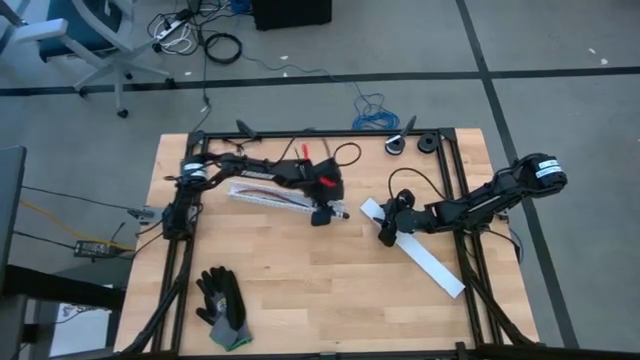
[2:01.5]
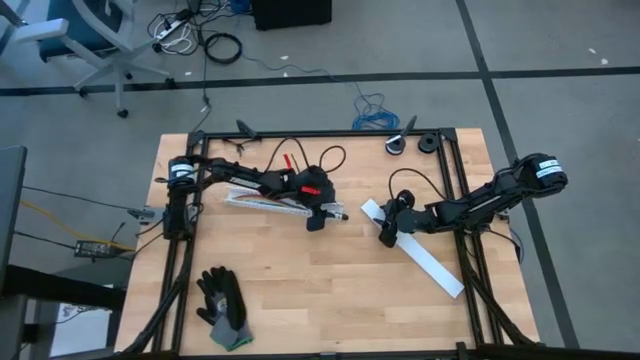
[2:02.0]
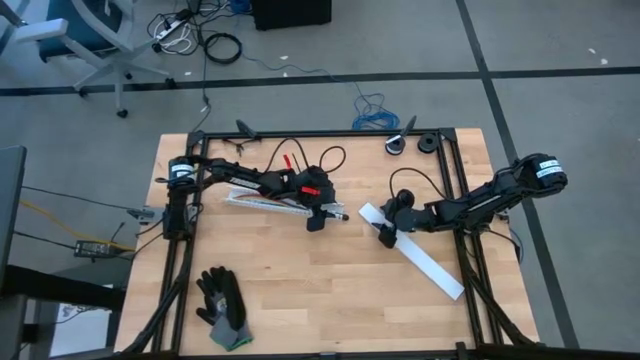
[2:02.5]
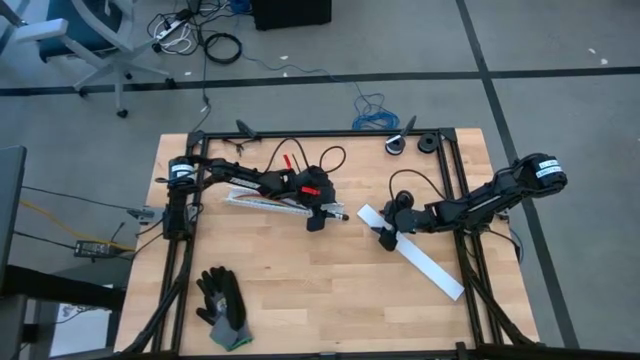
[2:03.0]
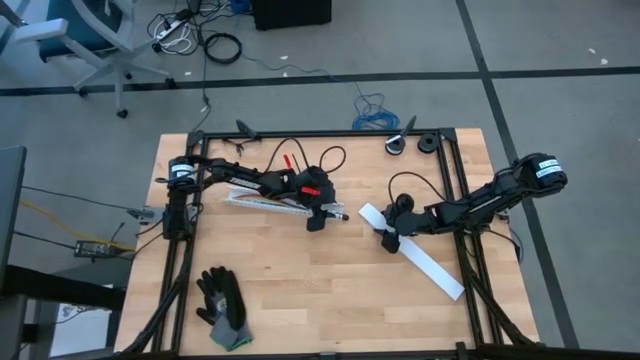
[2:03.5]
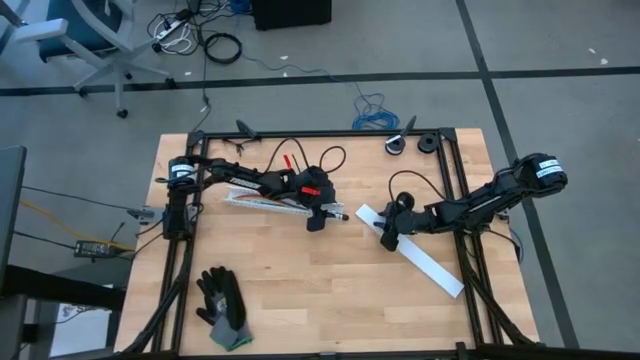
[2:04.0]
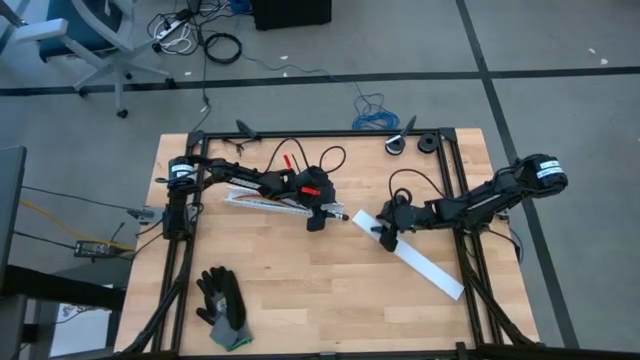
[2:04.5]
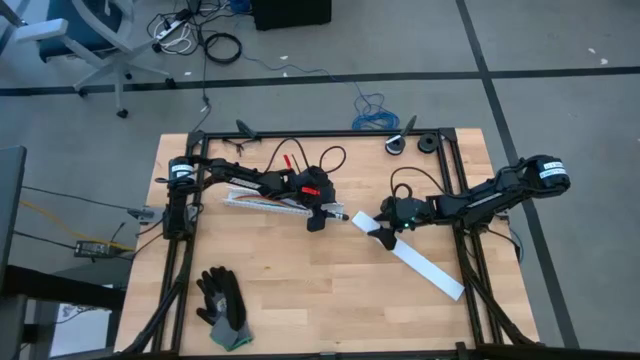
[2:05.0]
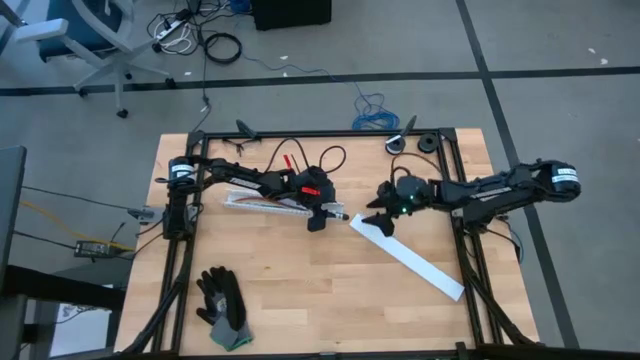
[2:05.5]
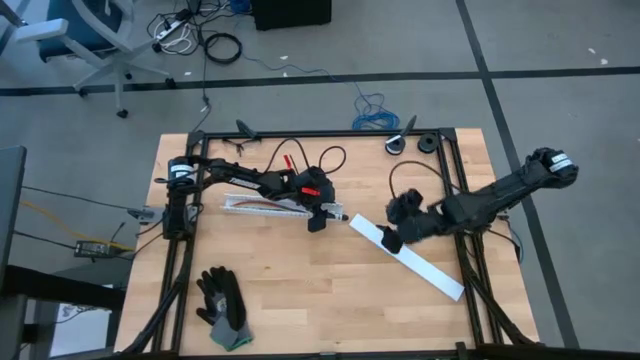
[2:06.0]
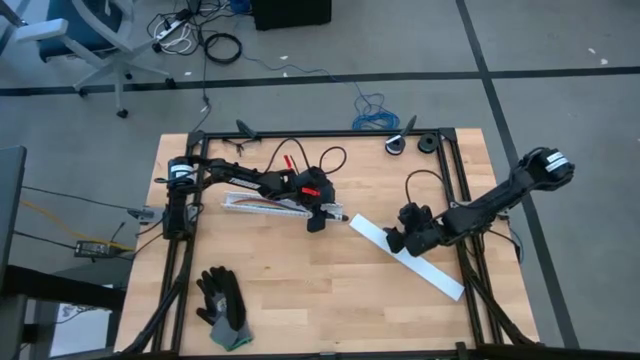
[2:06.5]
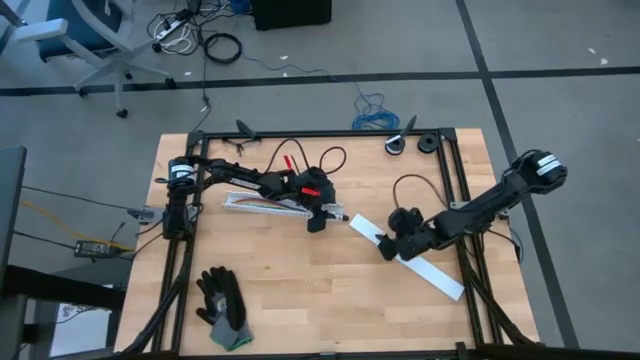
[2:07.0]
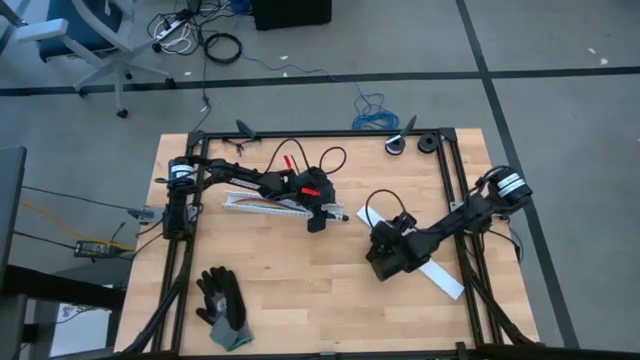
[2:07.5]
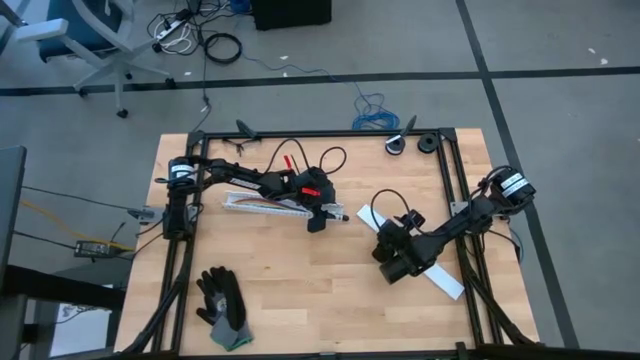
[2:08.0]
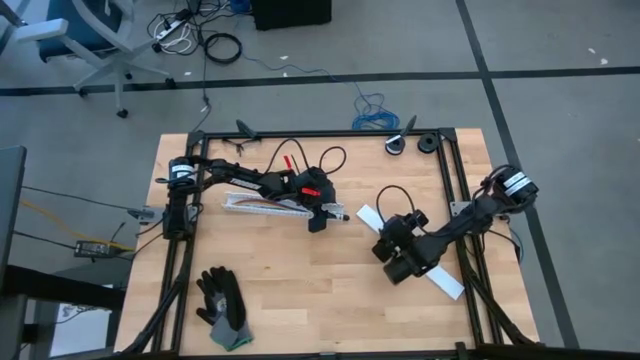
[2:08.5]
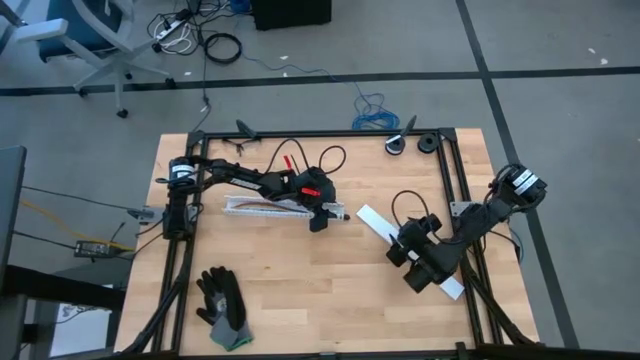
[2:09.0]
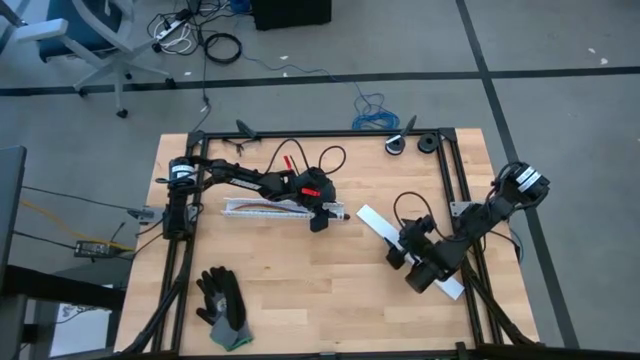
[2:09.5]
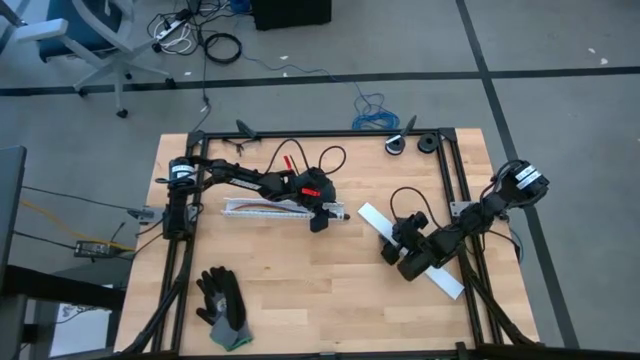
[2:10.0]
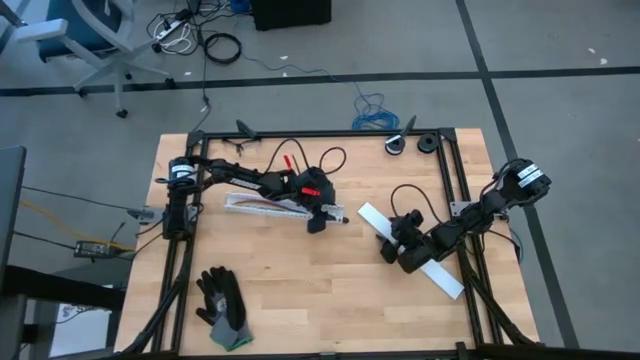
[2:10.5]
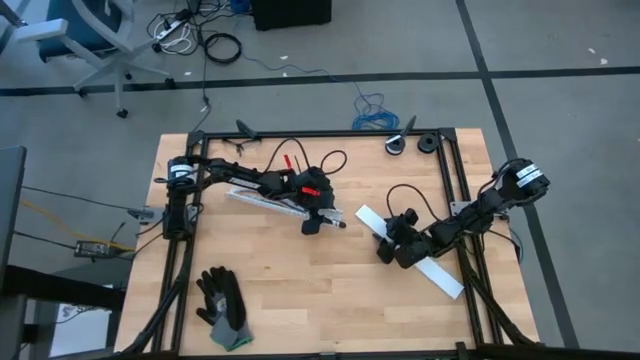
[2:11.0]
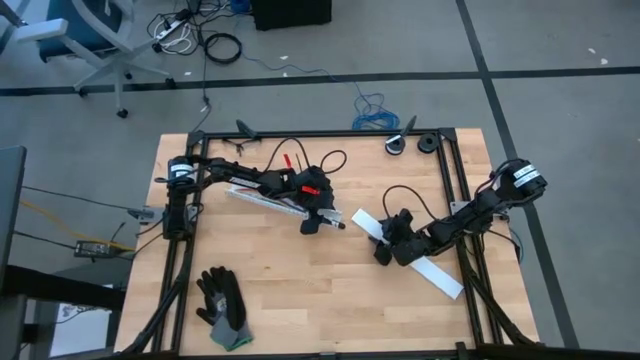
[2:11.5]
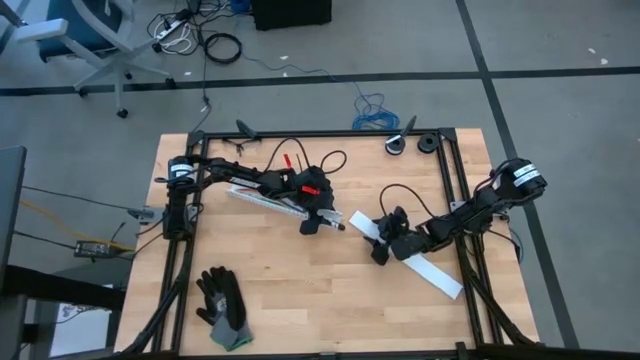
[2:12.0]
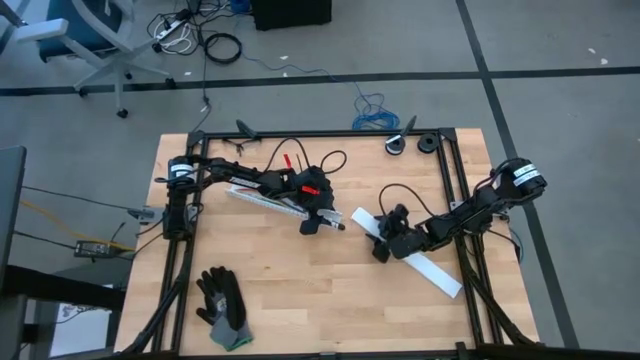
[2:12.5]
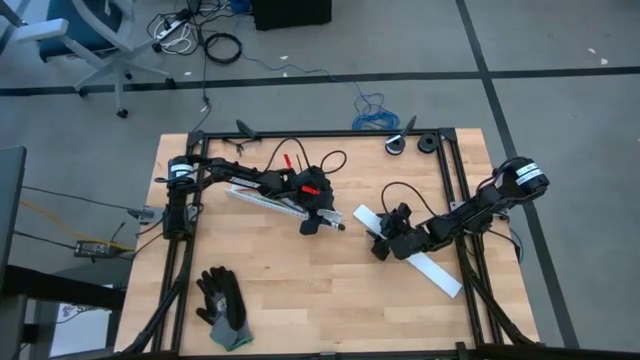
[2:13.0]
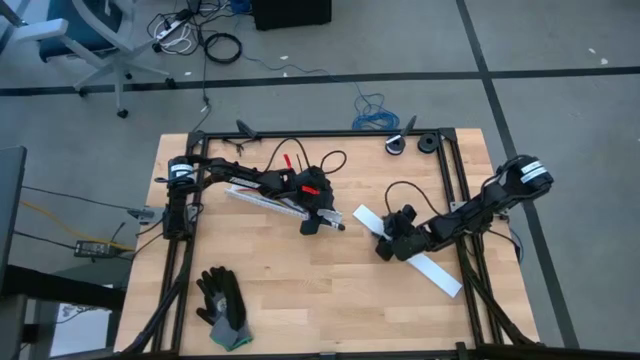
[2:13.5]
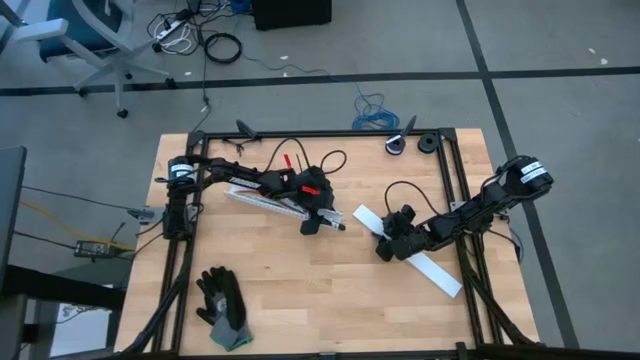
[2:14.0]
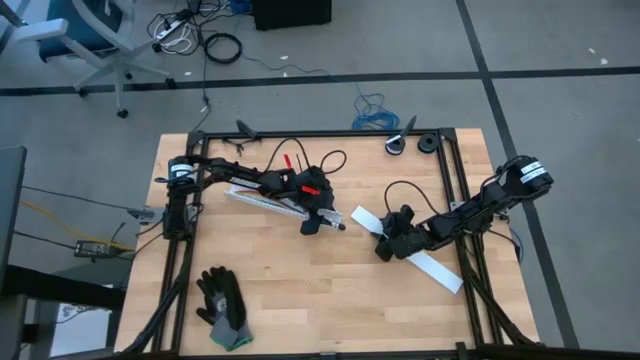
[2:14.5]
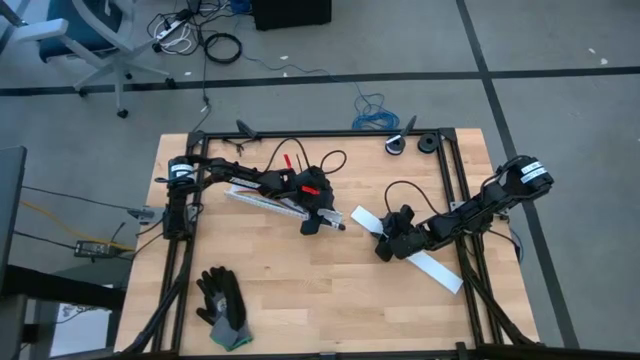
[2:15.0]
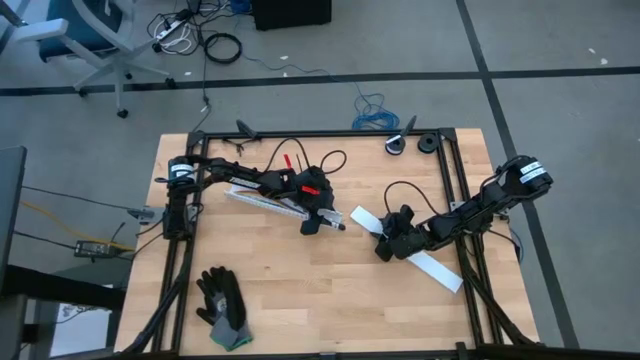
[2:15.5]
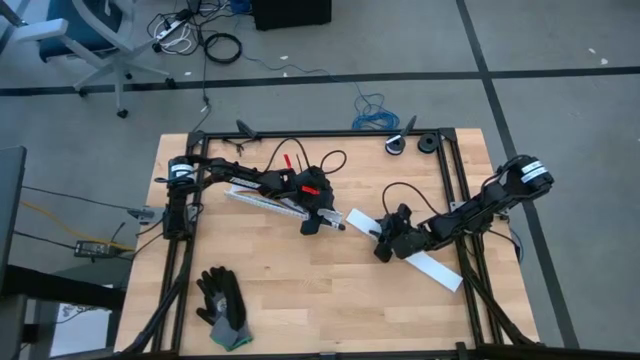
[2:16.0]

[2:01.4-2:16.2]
Task: Ziptie cables
Close the white cable duct with the cover

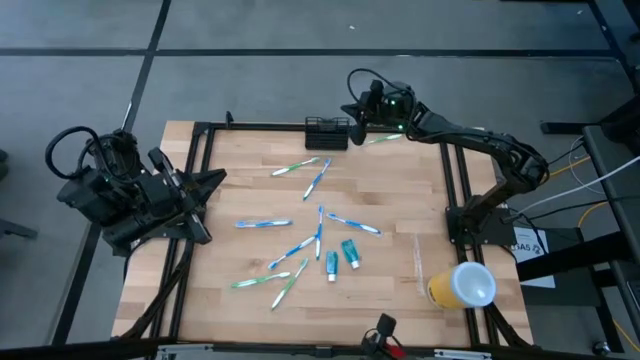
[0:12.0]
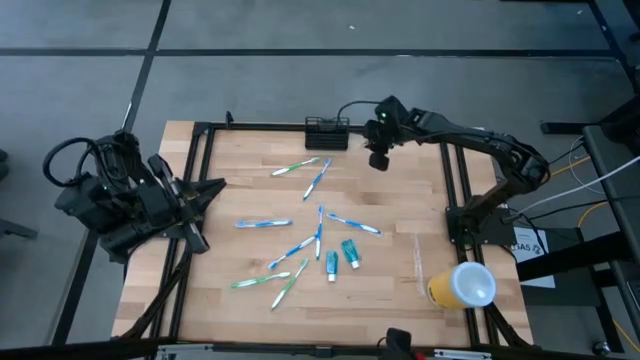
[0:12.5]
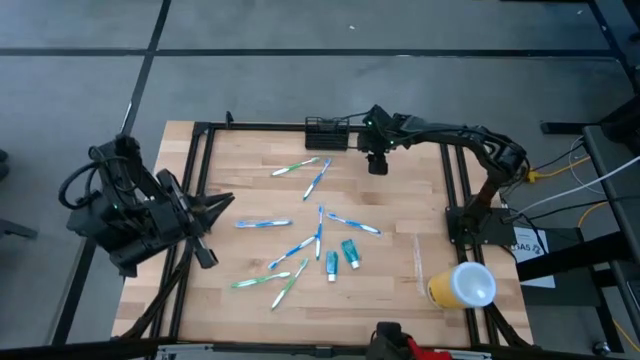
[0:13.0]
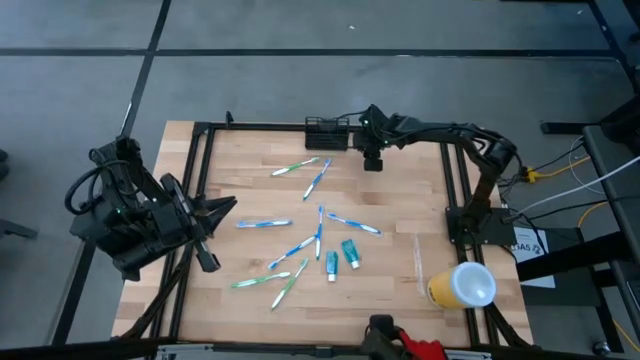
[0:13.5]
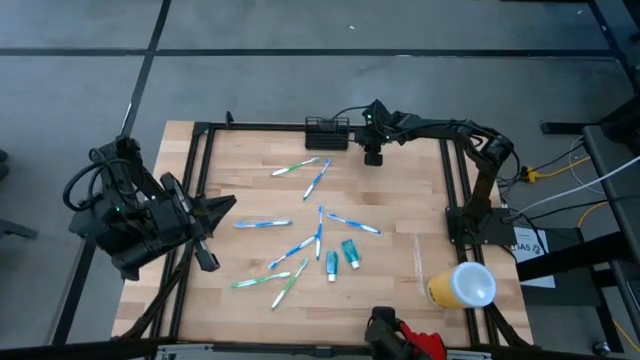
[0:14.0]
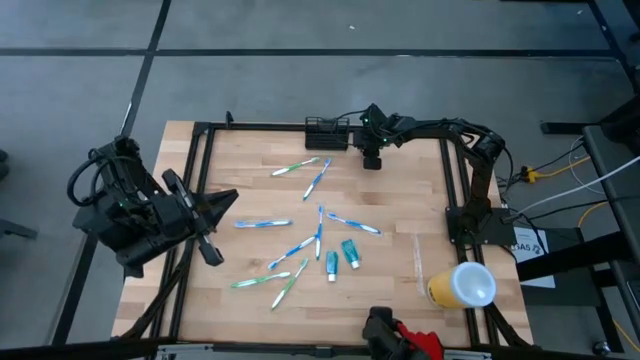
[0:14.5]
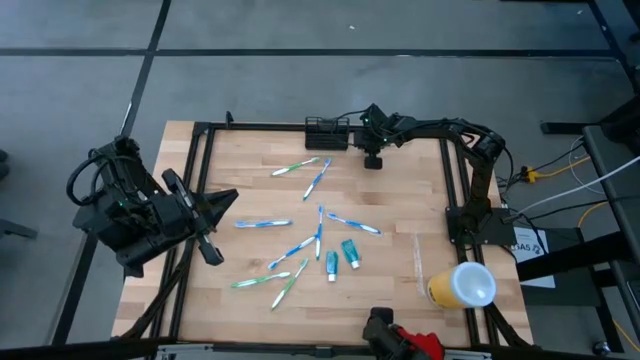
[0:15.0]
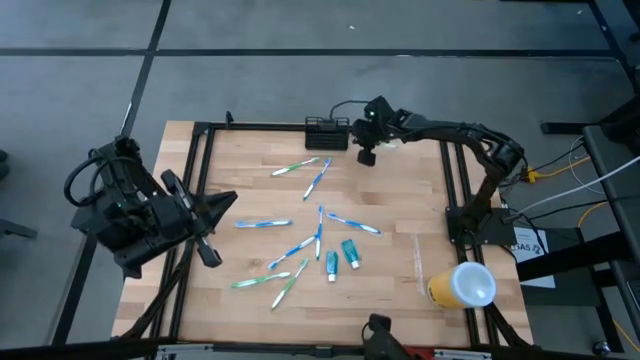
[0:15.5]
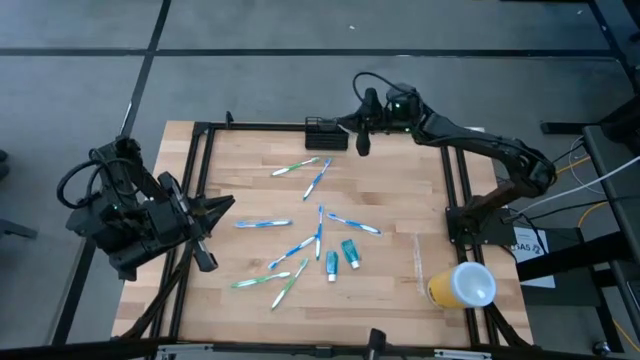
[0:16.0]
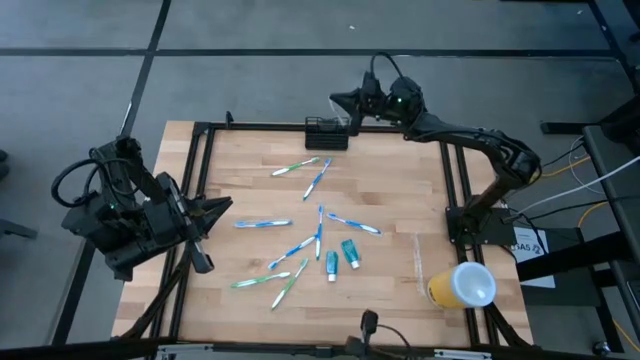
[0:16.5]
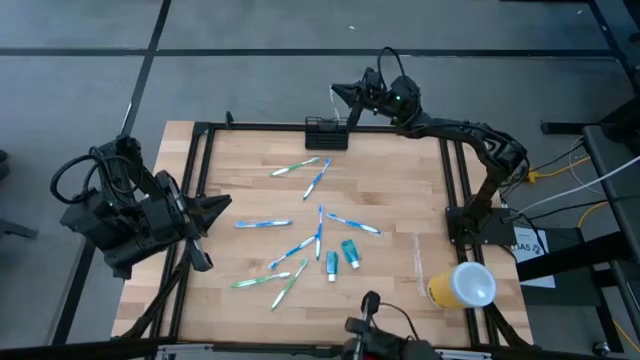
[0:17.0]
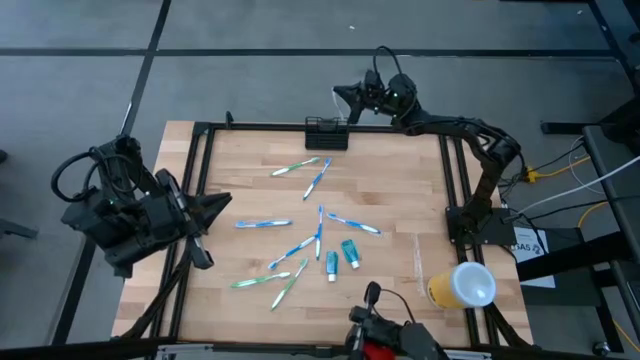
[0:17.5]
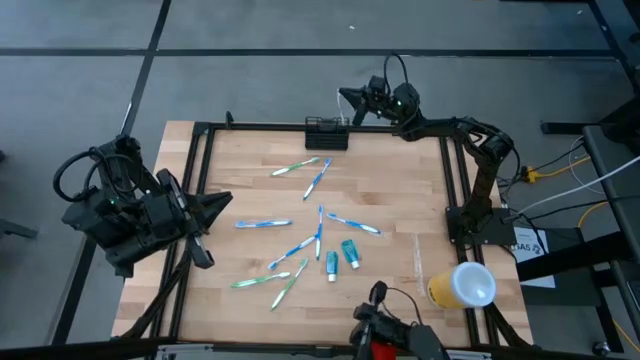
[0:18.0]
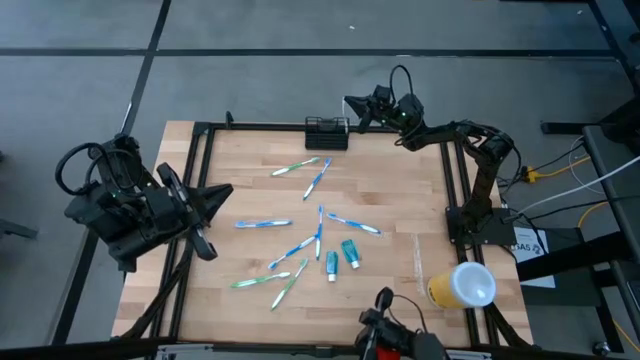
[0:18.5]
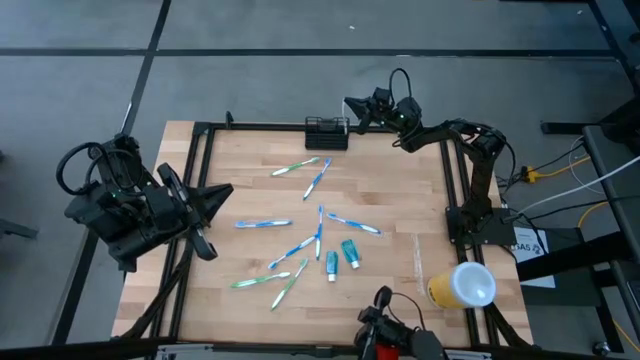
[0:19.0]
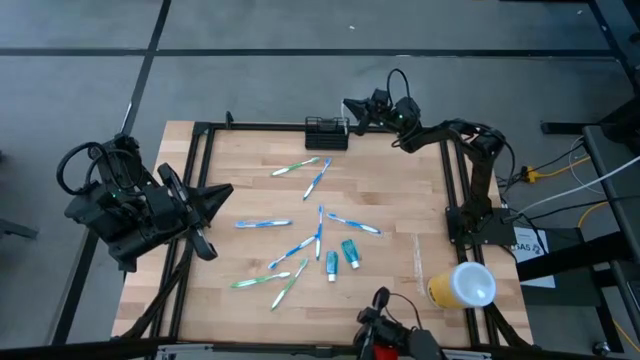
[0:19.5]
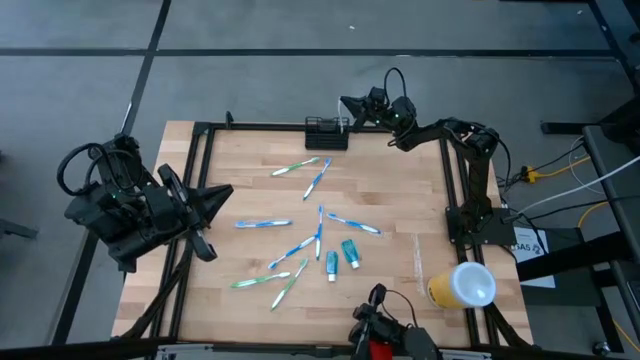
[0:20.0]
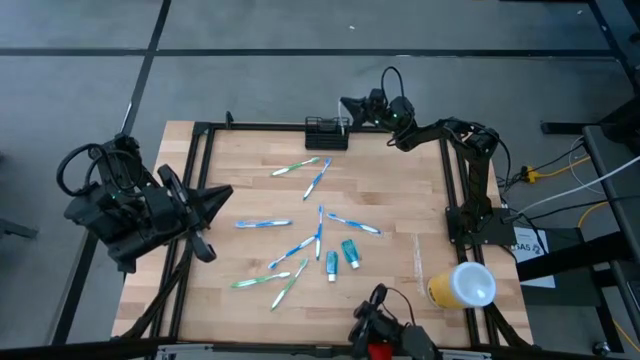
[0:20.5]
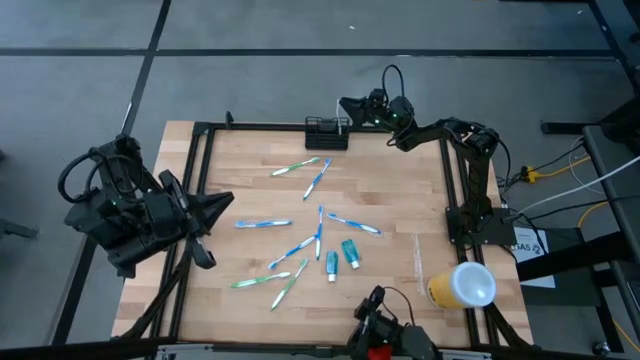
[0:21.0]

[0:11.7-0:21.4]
Task: Pick & Place toothbrushing station
Put the green toothbrush into the wire organizer
